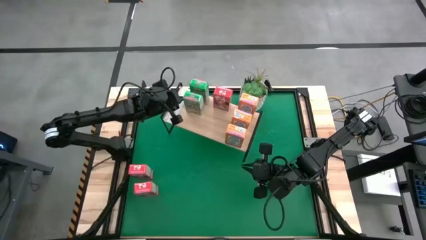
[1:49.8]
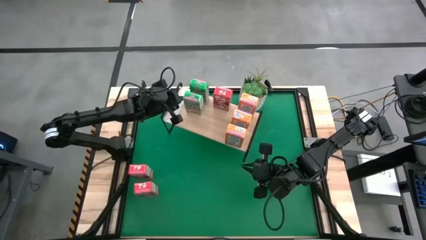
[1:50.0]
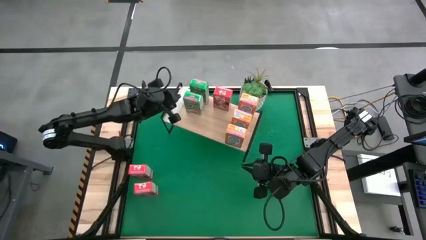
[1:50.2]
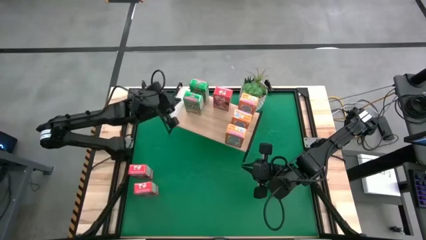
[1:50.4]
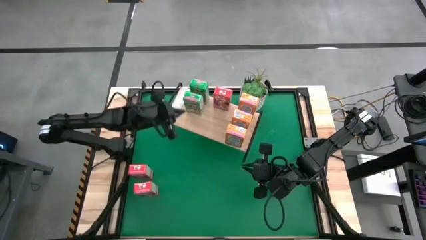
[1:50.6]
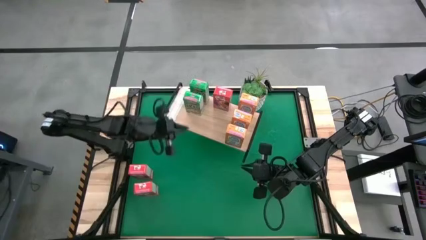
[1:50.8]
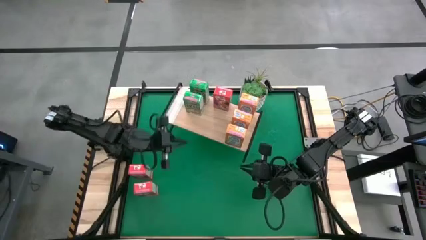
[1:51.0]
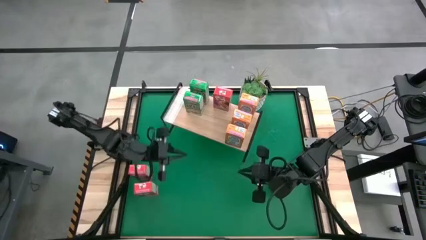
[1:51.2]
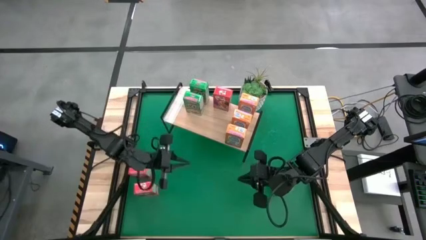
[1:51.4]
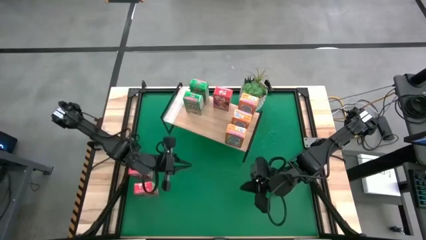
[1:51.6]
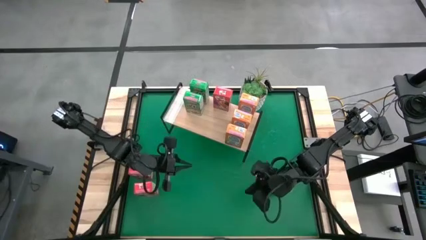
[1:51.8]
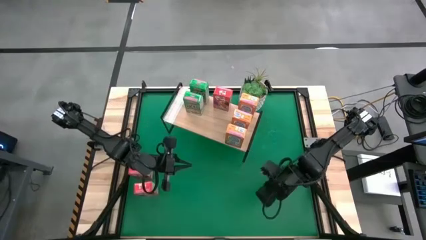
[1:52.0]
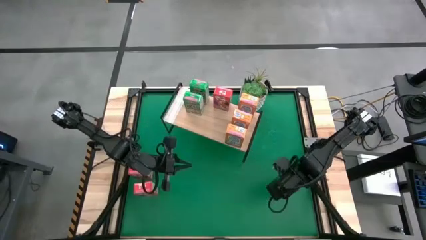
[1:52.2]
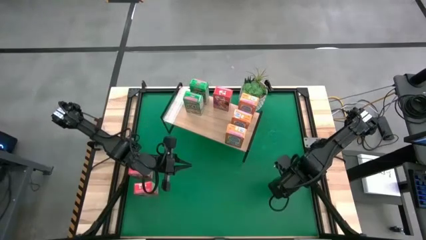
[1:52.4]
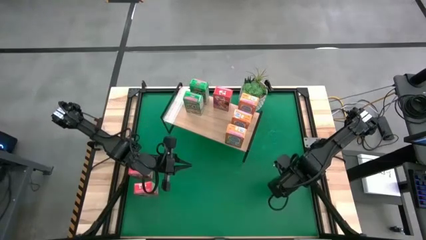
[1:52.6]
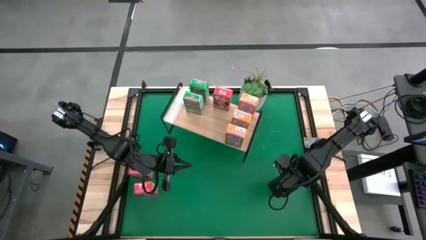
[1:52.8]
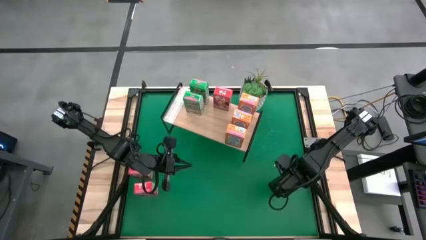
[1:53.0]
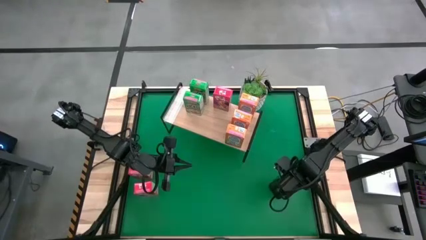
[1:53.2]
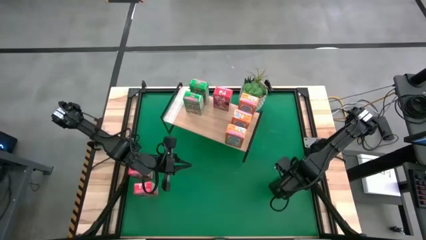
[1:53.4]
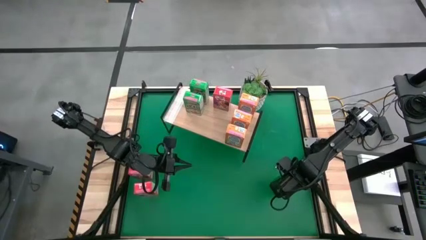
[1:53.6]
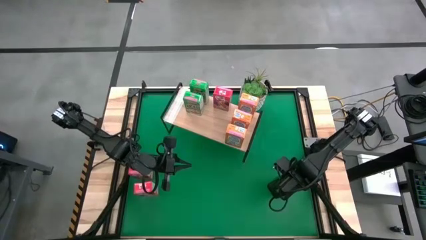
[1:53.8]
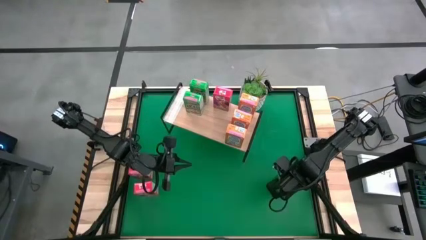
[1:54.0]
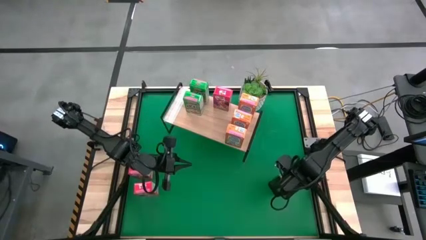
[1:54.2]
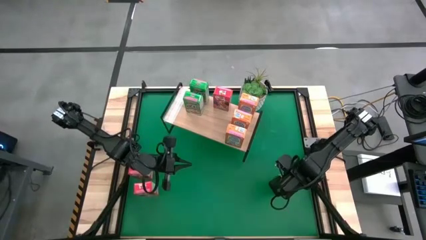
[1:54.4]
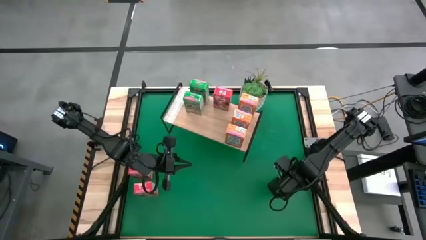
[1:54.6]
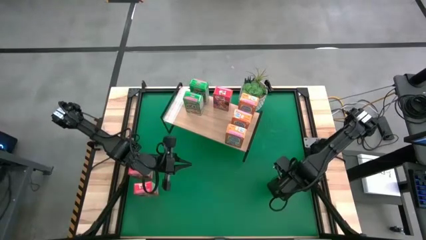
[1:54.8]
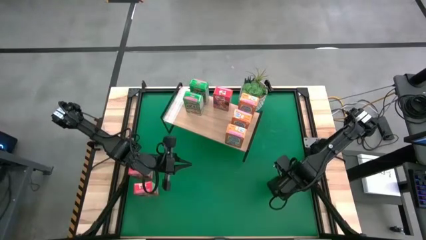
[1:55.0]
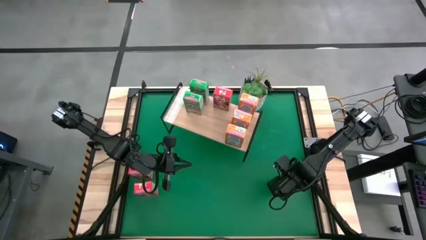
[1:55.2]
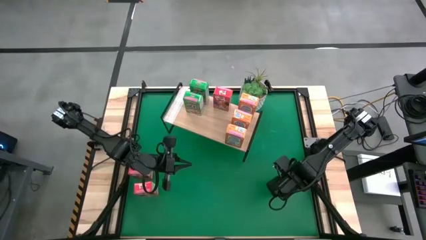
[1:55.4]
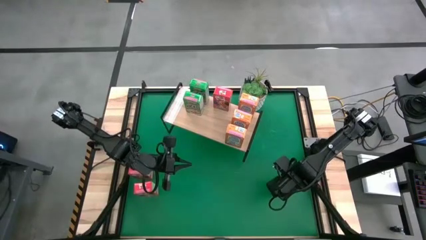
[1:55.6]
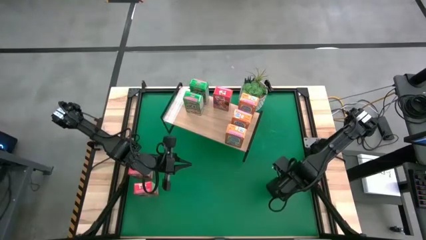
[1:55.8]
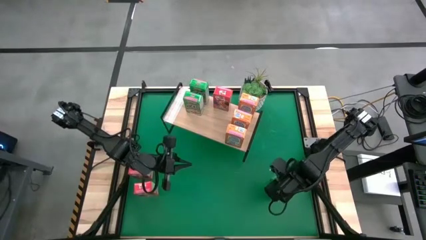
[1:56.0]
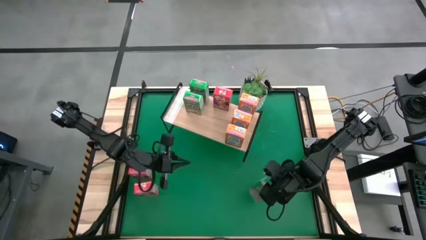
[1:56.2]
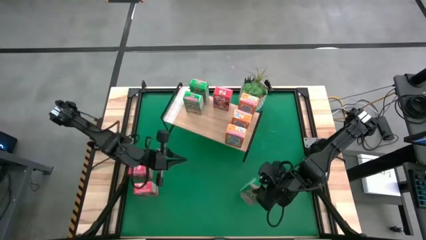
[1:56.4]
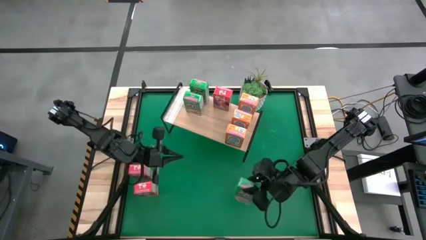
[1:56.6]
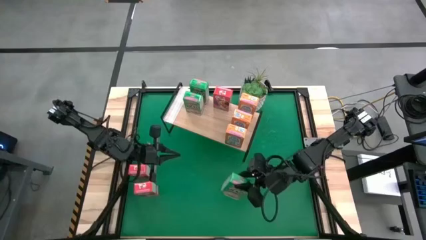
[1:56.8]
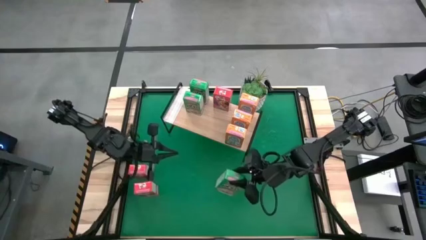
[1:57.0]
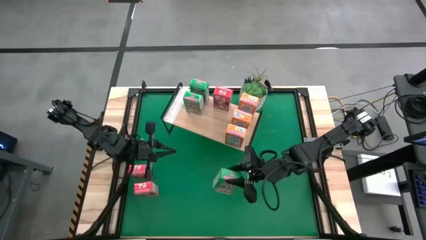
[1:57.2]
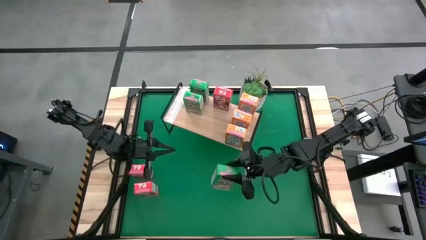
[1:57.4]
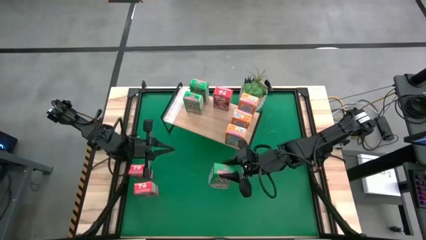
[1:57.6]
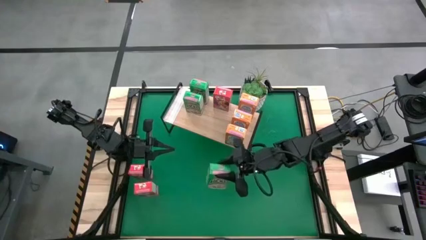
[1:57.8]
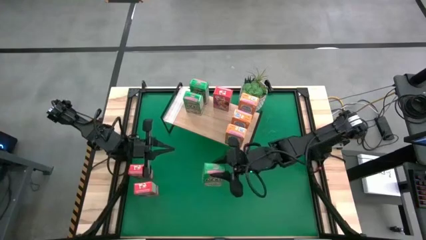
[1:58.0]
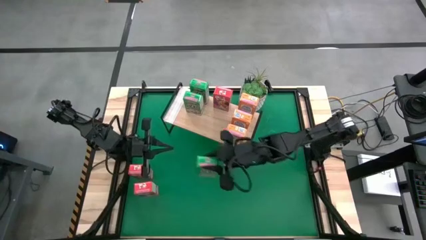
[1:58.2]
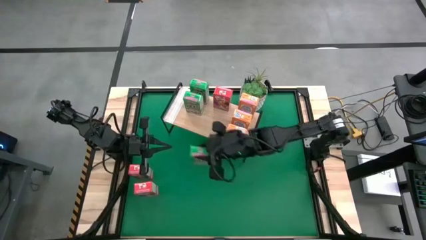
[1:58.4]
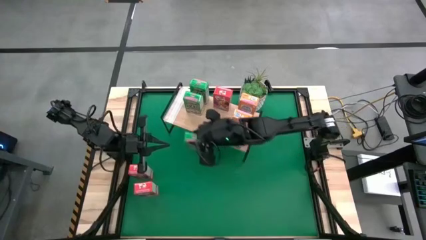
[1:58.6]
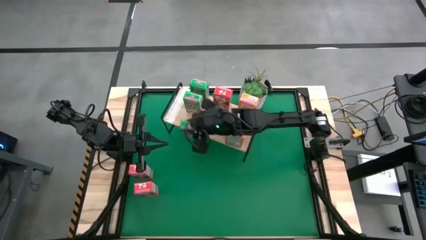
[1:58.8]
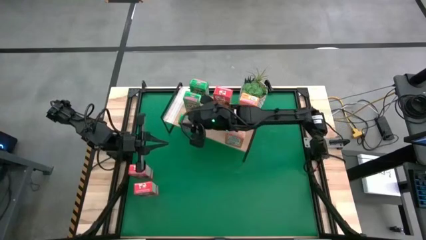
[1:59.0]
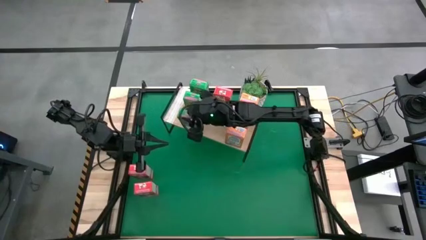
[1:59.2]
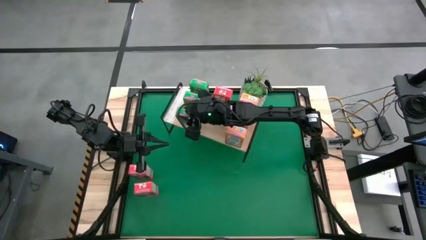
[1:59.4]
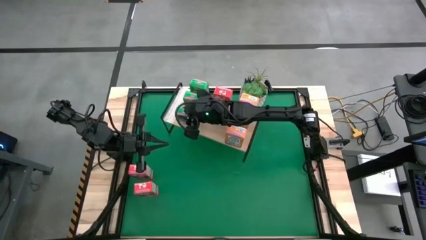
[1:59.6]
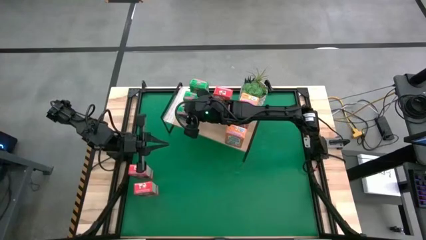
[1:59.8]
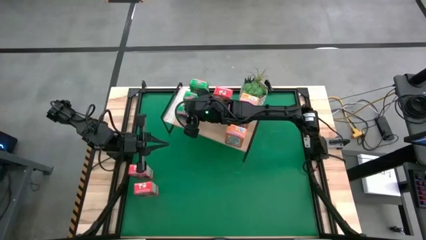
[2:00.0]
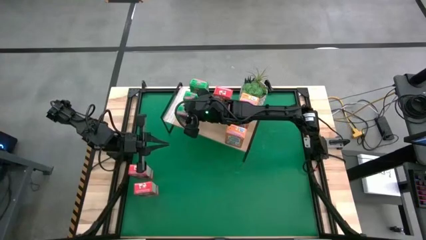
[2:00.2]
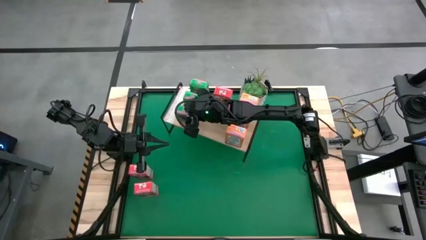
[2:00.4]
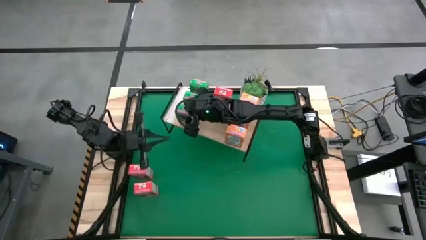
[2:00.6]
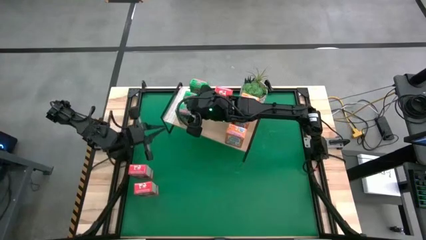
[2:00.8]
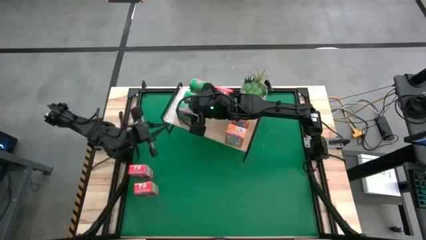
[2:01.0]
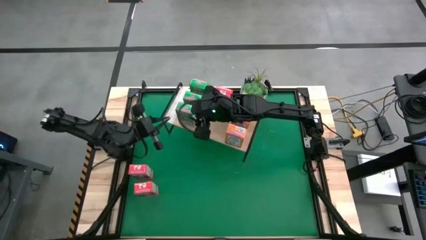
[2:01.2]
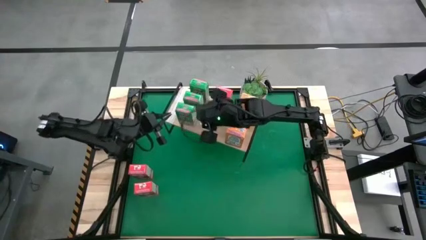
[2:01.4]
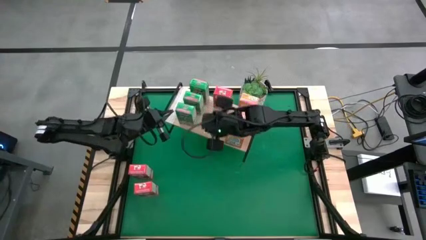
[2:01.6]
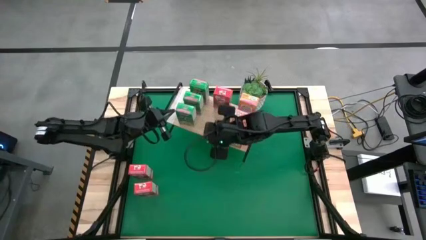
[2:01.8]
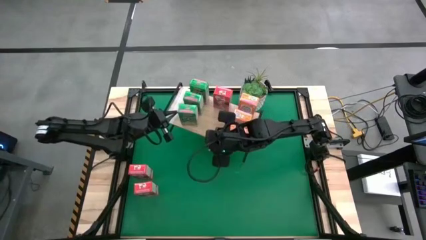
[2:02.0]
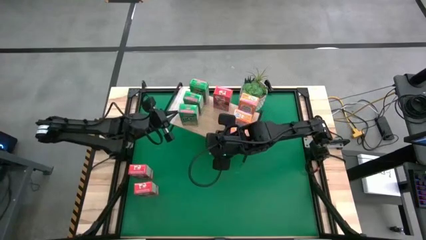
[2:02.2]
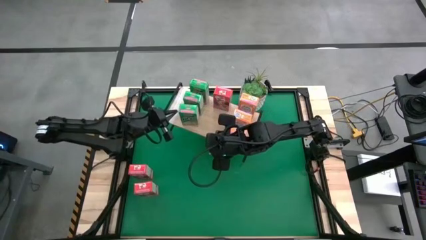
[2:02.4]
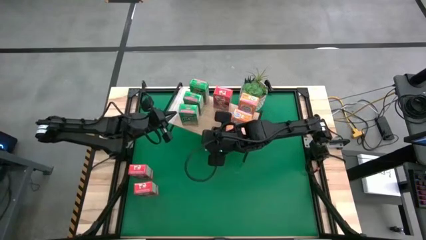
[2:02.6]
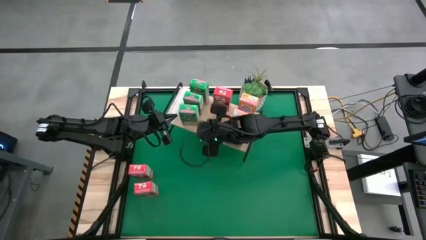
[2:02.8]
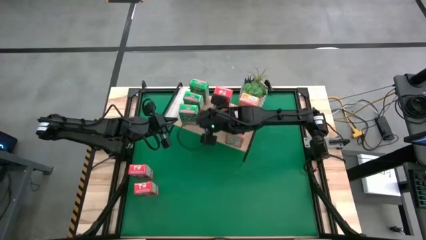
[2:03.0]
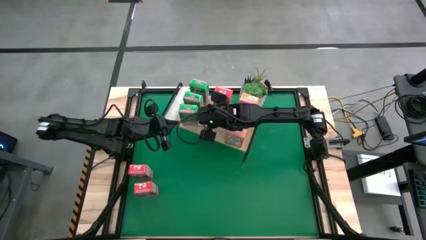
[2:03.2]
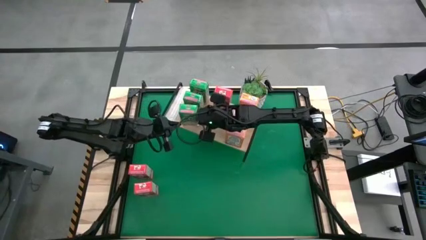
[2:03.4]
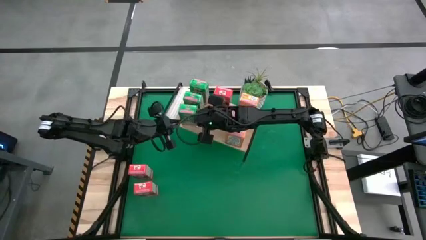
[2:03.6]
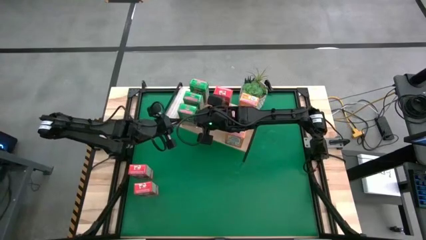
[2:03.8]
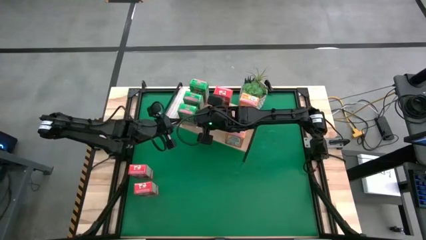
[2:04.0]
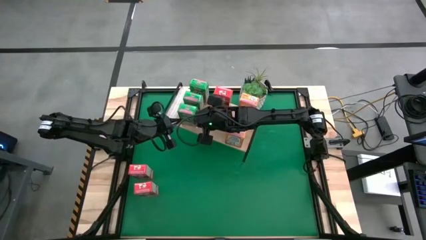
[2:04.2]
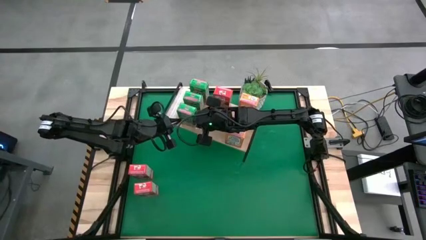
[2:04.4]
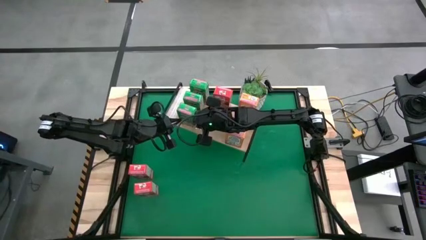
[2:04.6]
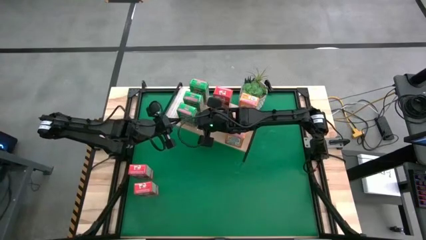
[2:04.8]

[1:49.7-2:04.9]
Task: Stack cereal on shelf
Put the green cereal box aligned with the other green cereal boxes on the shelf

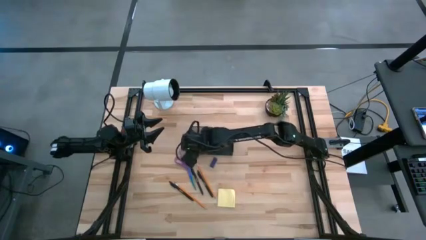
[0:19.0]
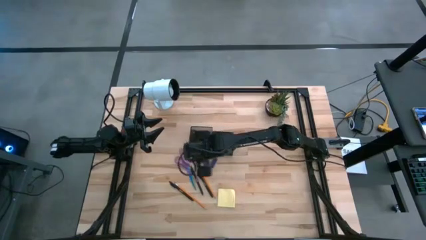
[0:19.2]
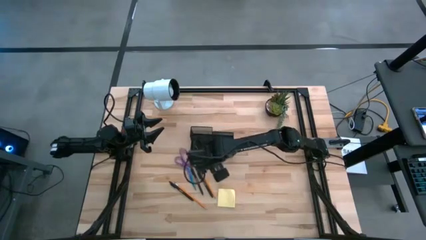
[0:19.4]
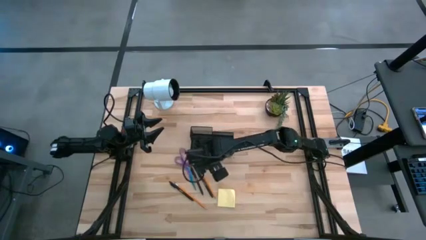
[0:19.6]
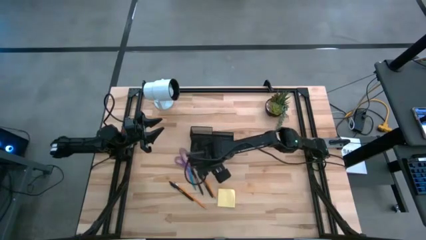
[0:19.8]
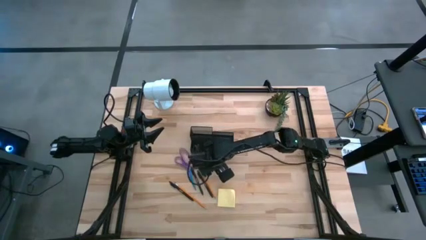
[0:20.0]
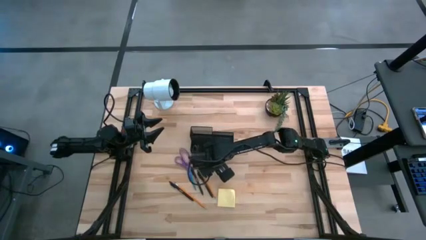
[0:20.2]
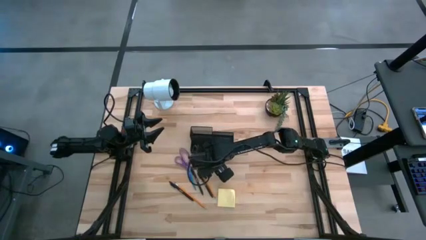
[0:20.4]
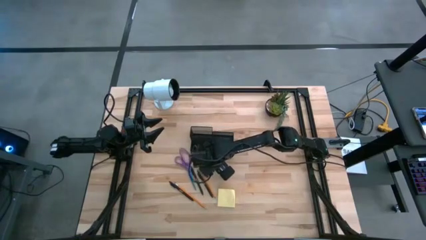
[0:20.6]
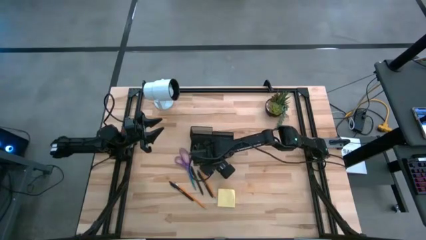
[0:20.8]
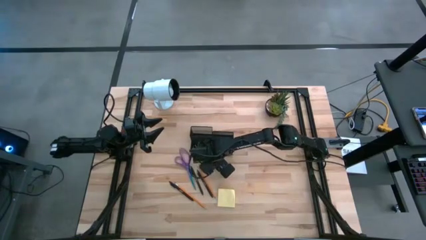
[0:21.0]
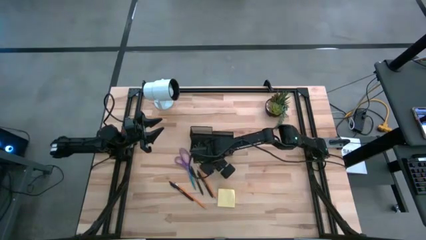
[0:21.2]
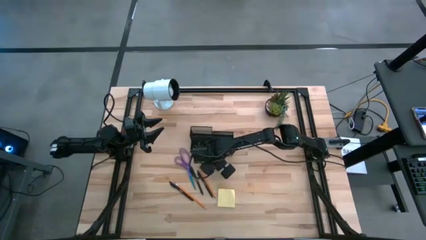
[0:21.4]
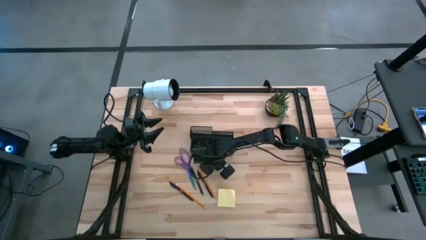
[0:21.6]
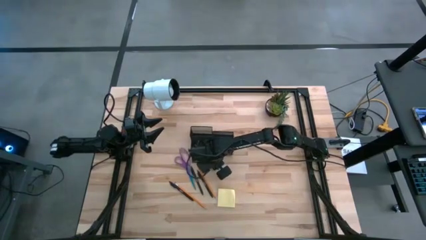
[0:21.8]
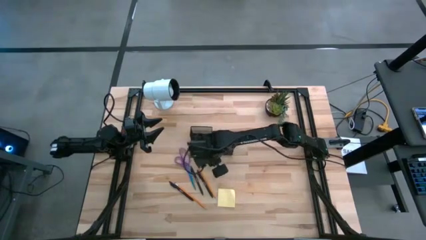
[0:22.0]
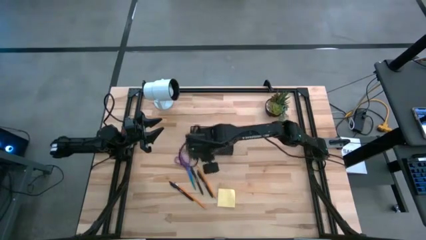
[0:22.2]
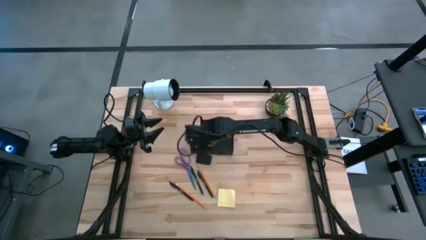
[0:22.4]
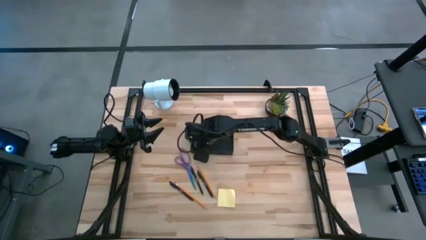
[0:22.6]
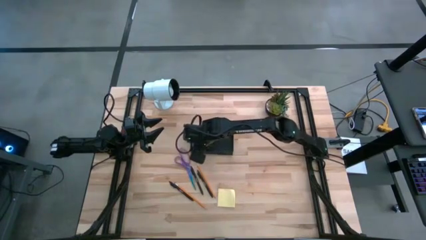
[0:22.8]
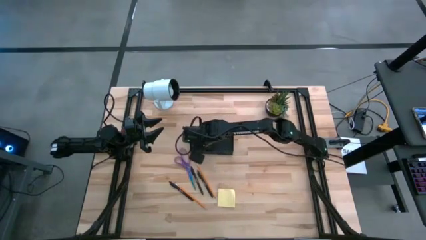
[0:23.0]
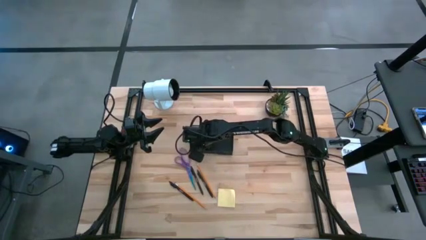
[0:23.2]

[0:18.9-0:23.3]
Task: Pick and place office supplies into organizer
Put the blue eraser into the black desk organizer
